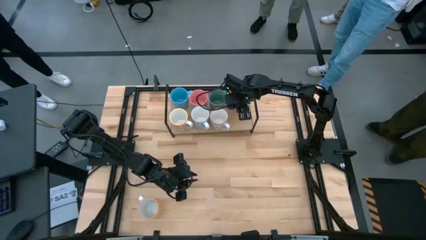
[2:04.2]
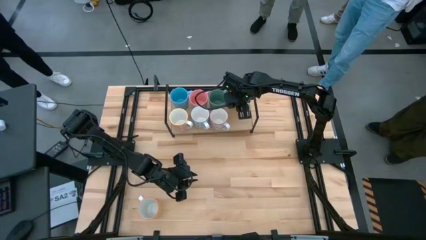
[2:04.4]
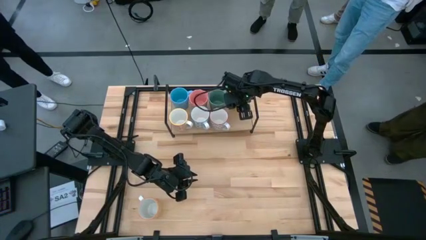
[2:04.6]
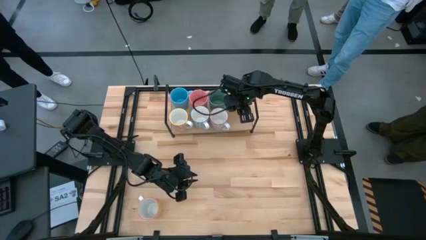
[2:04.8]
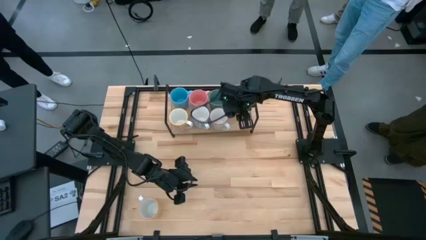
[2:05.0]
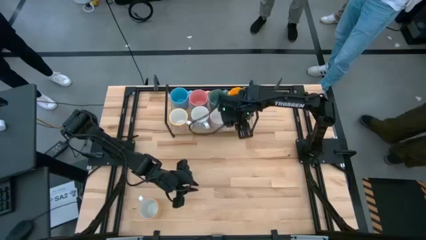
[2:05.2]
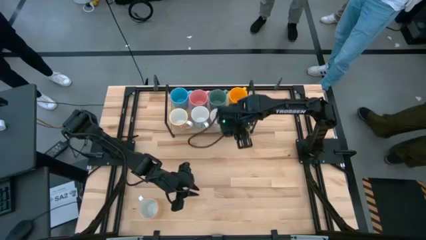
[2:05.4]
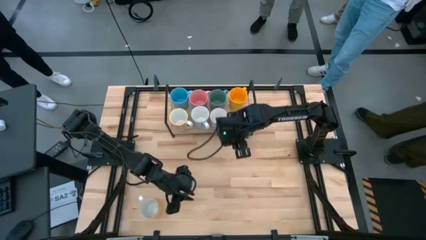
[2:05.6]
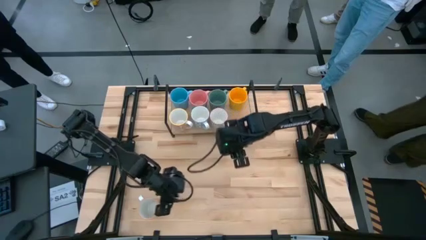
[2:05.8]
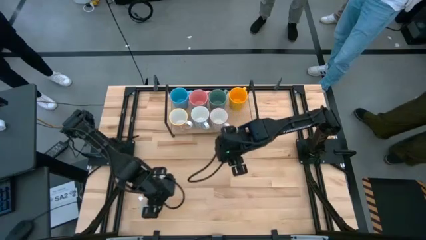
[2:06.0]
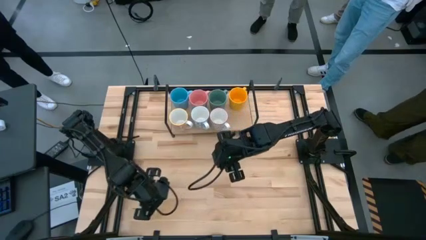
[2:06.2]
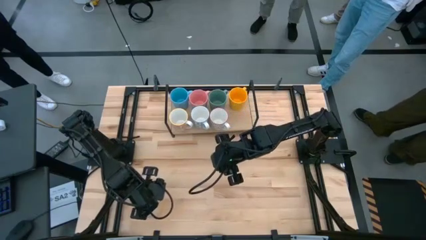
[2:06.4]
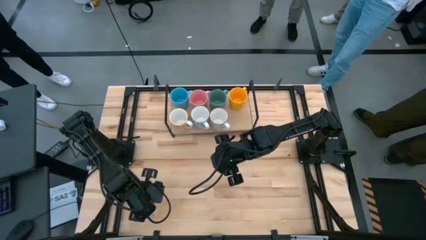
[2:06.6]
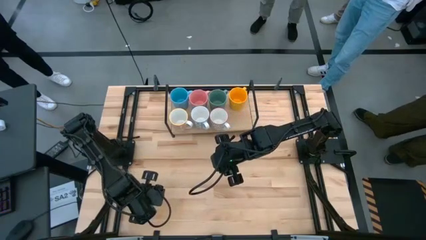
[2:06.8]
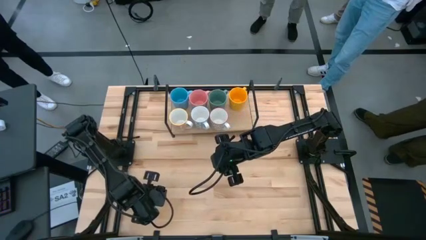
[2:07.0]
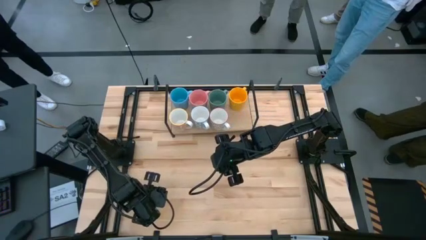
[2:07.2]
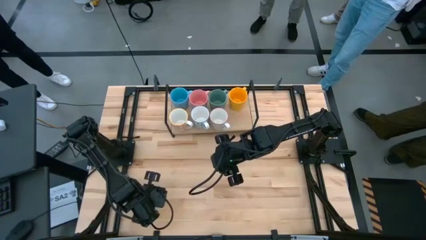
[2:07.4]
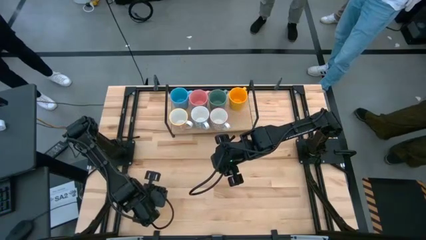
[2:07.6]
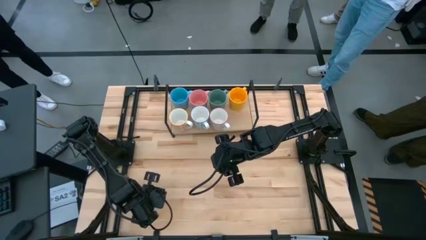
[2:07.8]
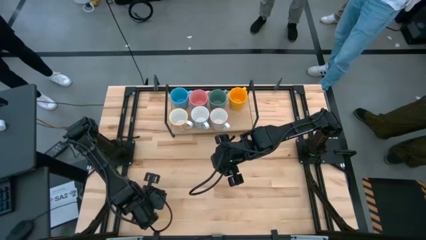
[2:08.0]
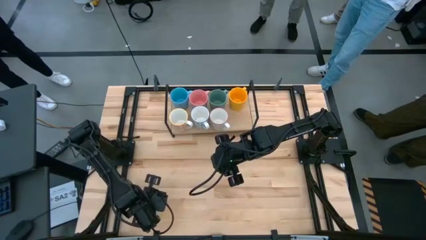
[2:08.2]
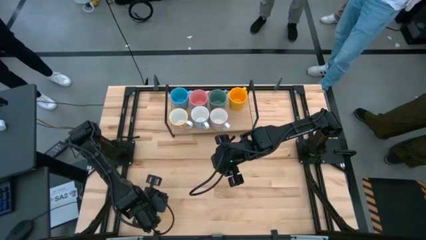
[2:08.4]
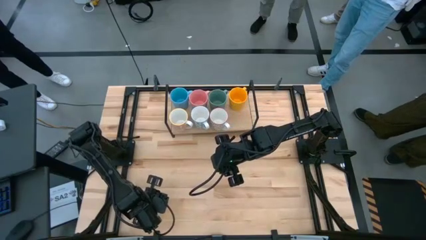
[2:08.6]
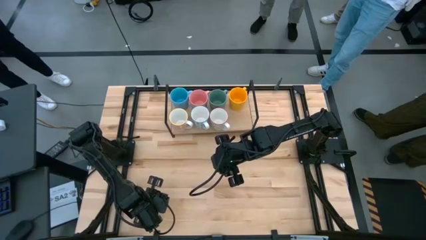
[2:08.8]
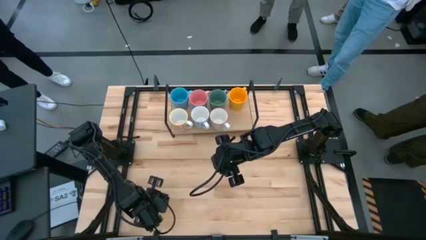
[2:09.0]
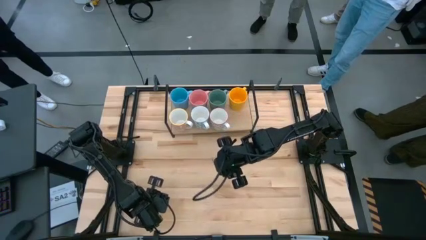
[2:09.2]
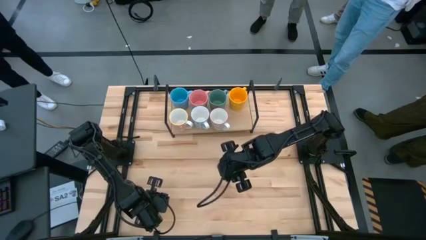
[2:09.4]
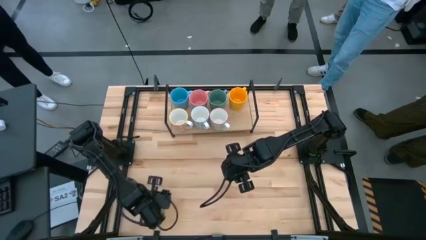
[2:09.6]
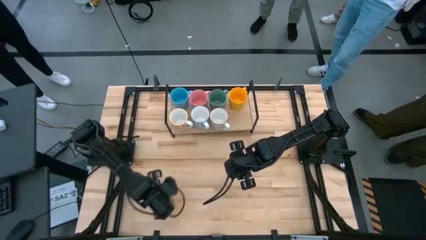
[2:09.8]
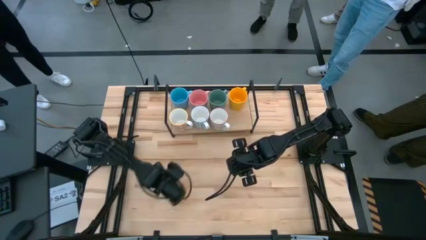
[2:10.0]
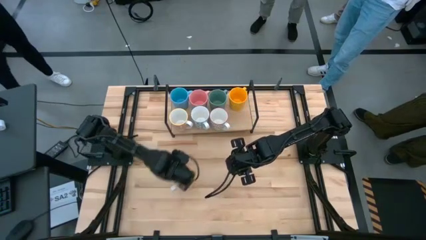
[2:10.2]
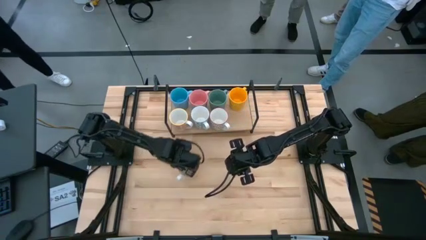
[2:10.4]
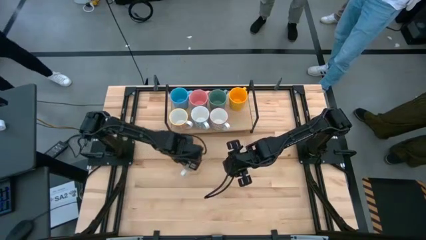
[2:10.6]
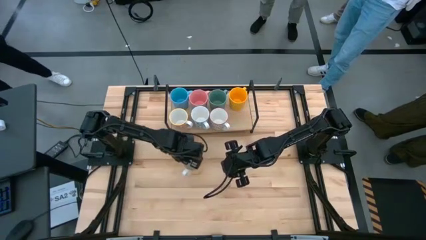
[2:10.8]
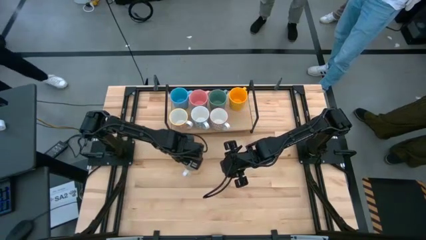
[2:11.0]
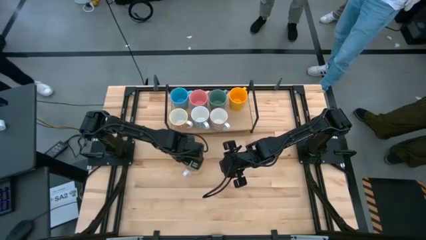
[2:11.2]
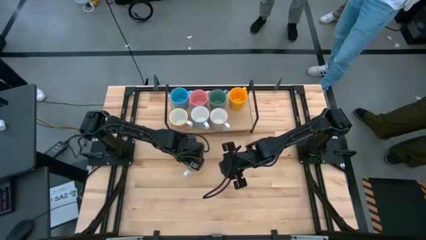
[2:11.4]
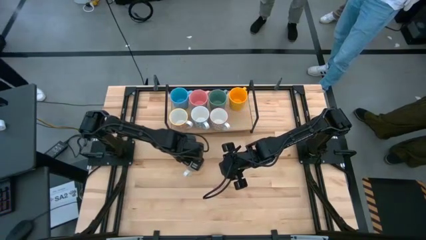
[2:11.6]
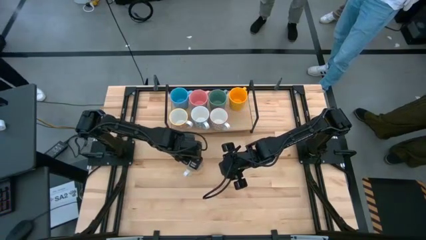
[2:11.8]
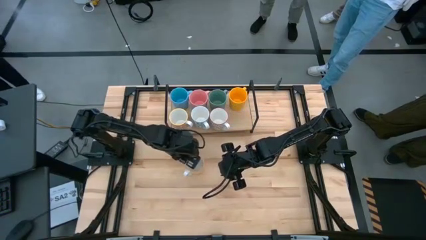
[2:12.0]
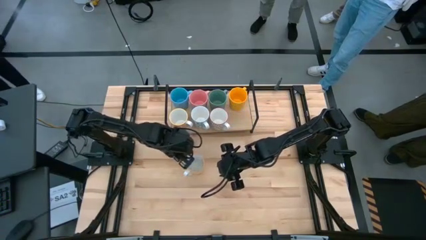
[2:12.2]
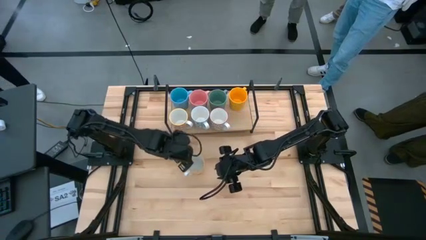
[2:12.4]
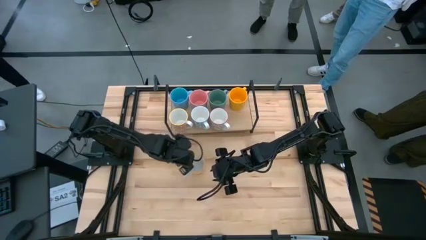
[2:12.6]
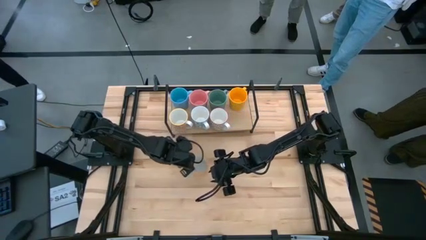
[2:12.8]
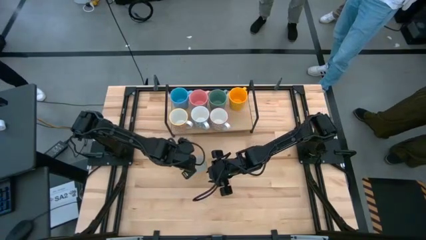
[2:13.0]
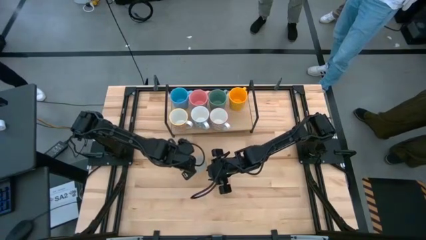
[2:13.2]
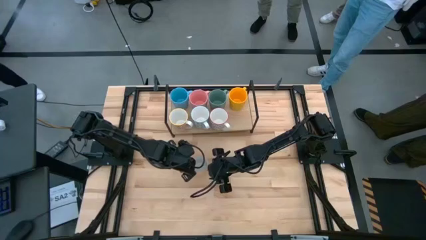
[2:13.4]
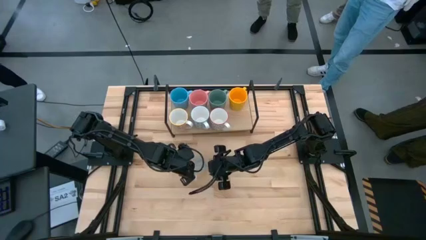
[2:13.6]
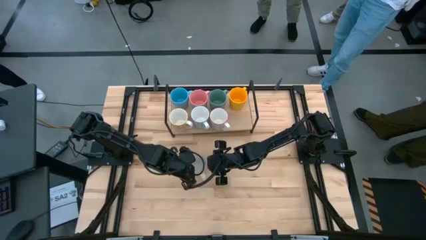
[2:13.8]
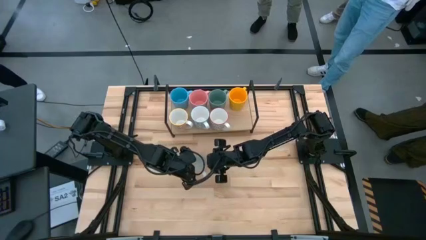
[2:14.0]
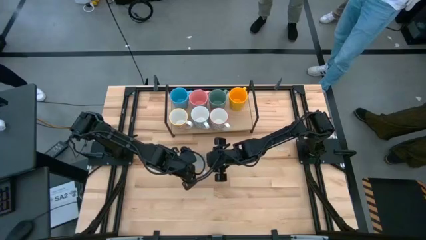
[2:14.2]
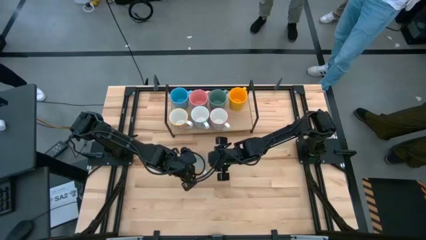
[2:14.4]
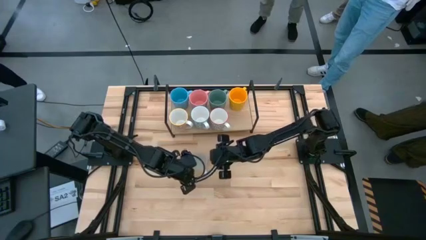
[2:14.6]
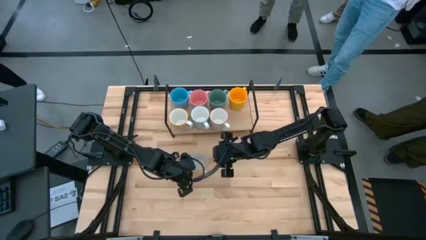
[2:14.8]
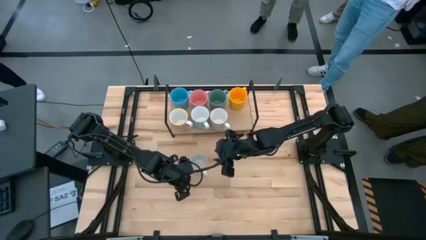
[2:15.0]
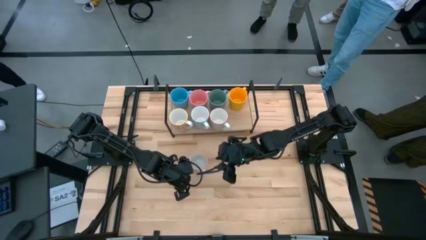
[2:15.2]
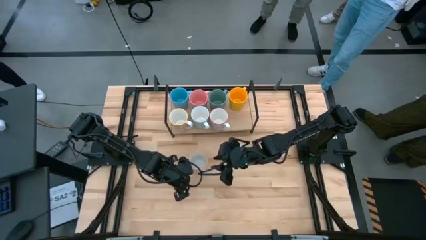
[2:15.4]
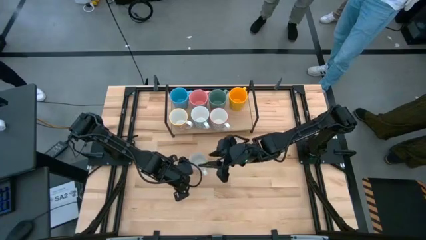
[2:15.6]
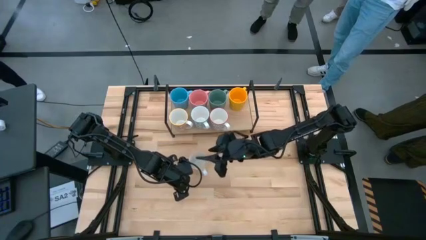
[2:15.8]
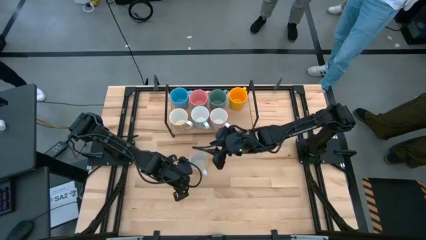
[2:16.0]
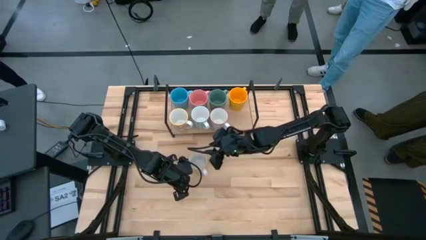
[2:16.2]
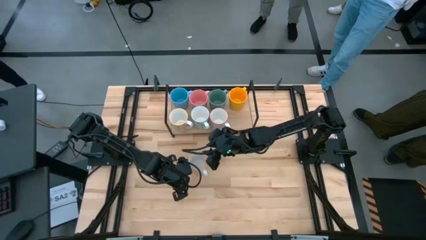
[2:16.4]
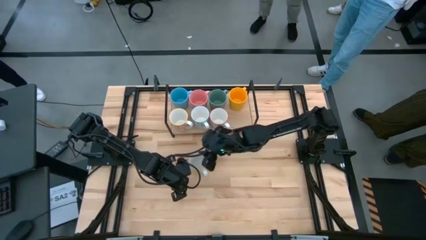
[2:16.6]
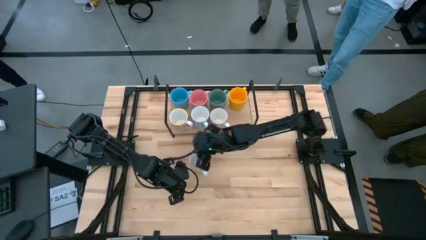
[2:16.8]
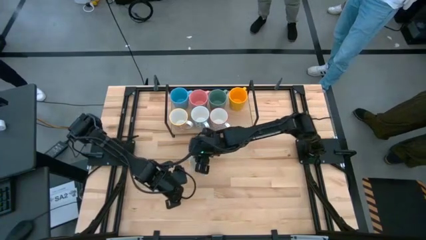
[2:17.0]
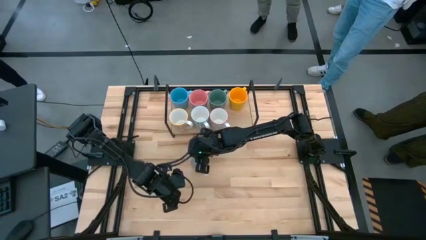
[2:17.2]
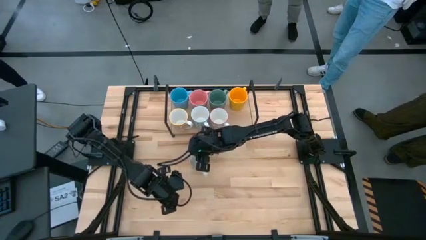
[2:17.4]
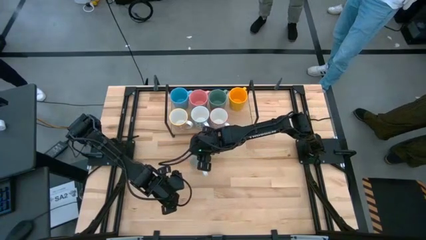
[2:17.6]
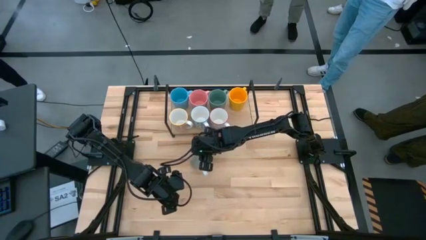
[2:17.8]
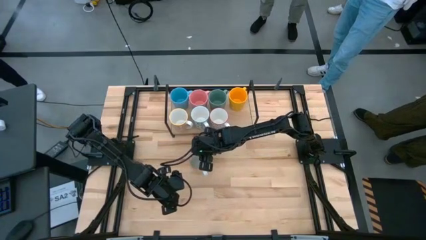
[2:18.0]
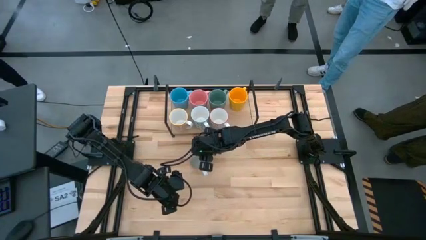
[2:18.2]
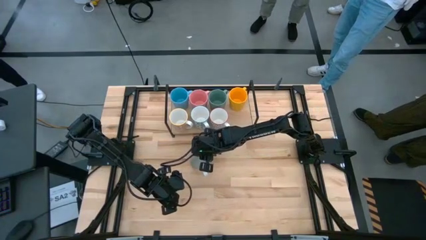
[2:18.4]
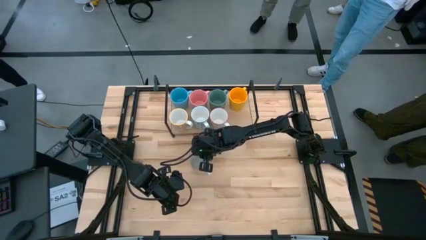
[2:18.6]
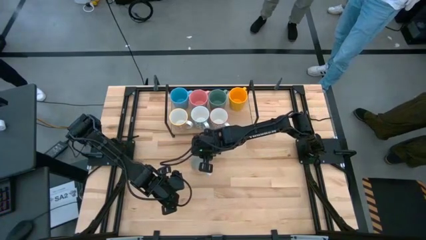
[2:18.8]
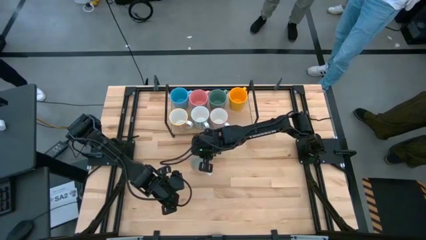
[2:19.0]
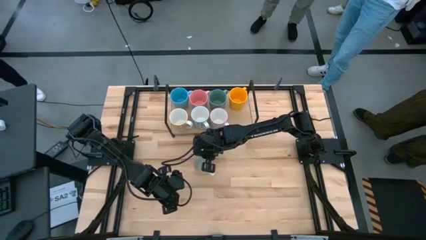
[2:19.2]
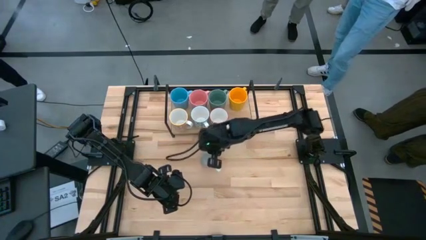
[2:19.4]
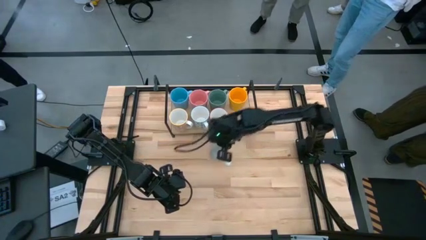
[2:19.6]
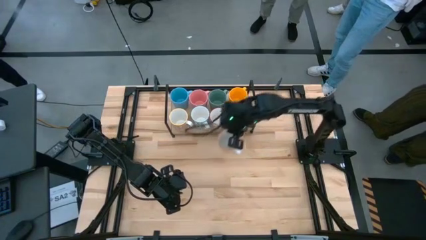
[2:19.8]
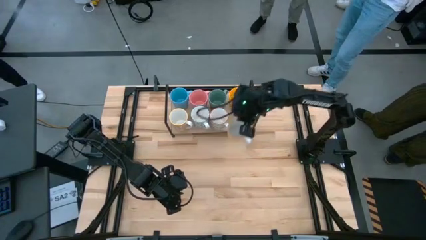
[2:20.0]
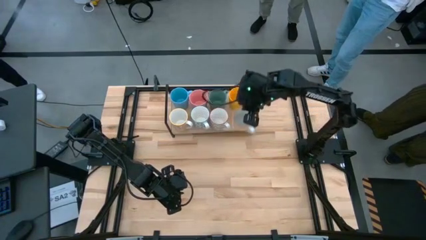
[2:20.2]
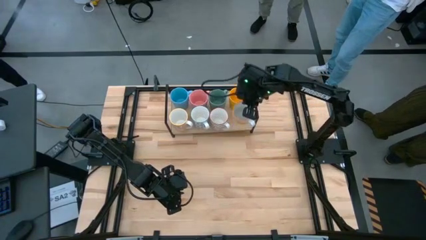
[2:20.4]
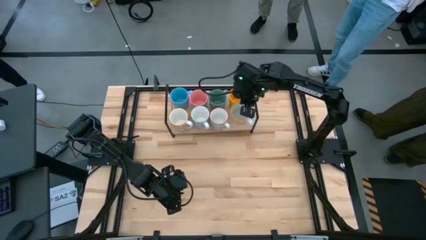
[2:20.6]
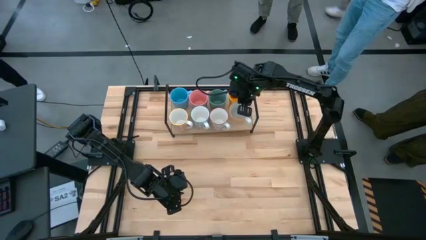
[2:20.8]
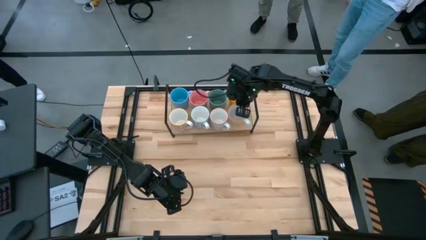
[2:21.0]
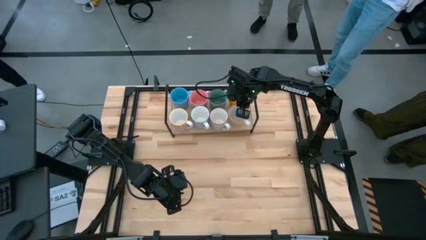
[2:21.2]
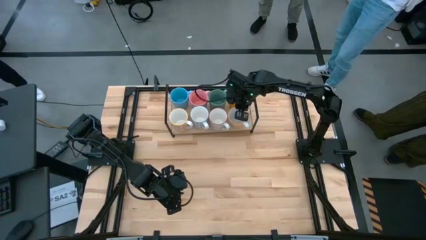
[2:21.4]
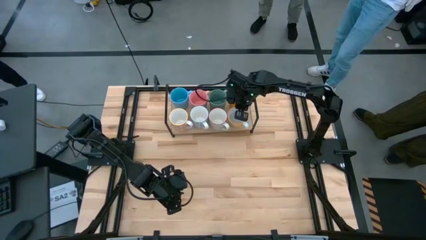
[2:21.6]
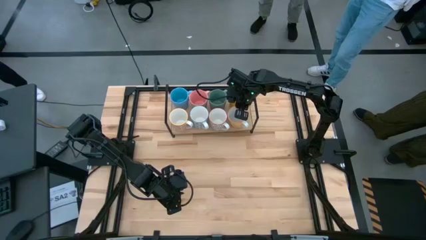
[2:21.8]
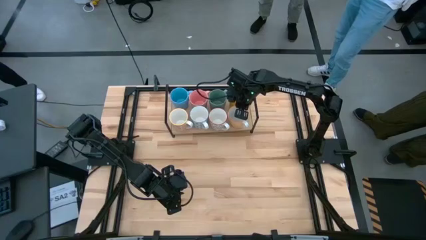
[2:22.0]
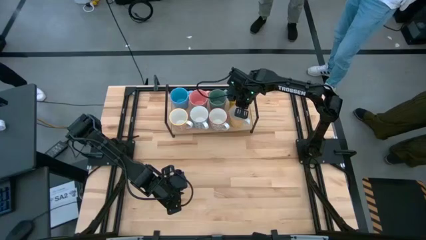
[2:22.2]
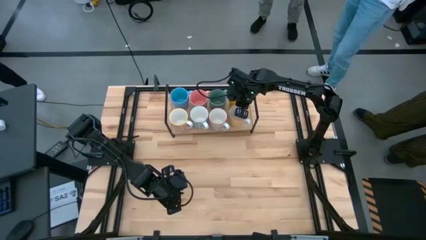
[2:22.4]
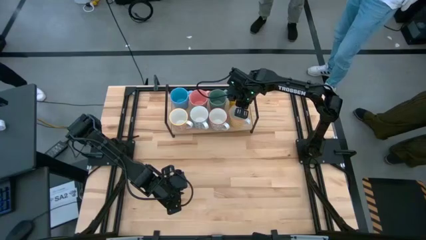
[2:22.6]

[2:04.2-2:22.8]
Task: Place coffee mugs
Put the yellow patterned mug on the shelf
